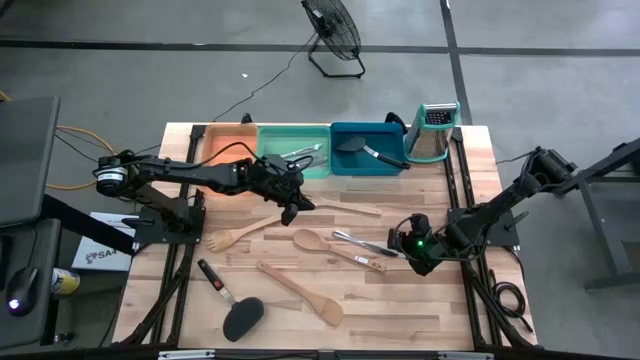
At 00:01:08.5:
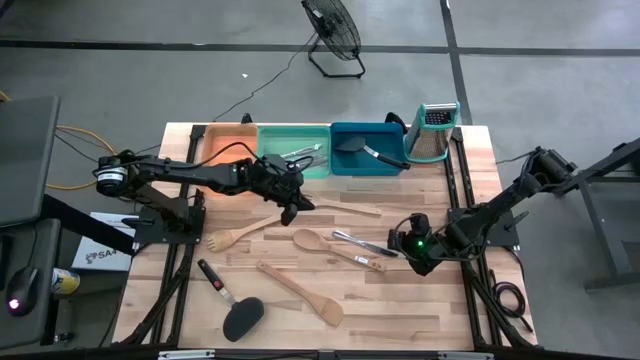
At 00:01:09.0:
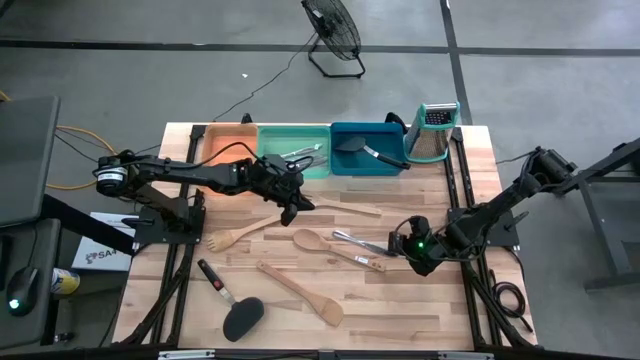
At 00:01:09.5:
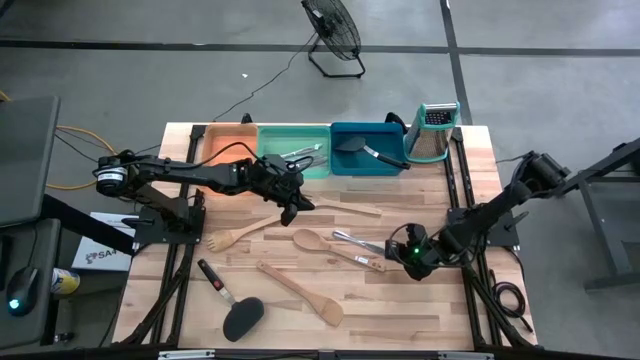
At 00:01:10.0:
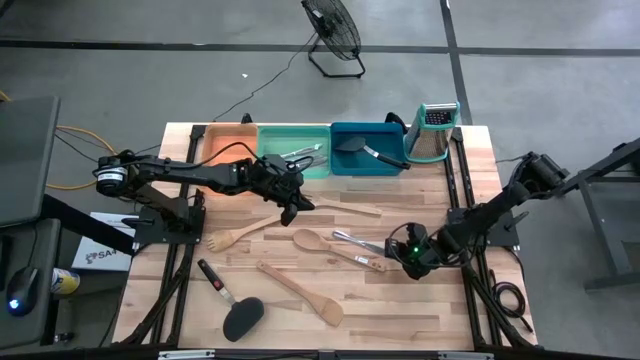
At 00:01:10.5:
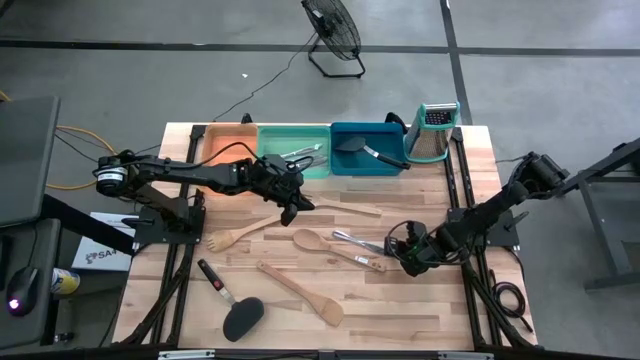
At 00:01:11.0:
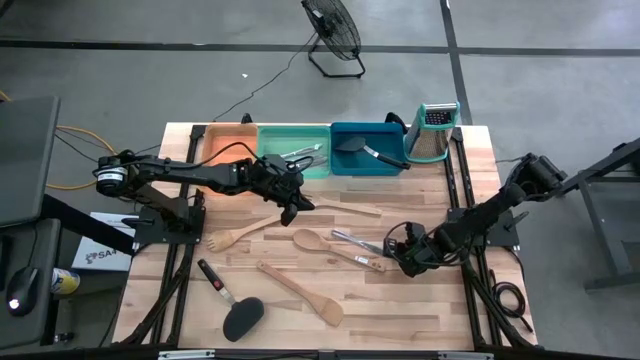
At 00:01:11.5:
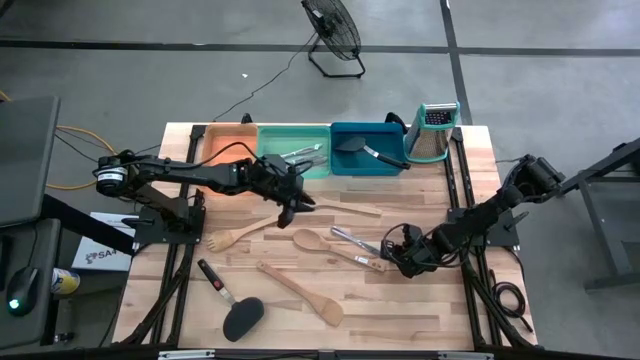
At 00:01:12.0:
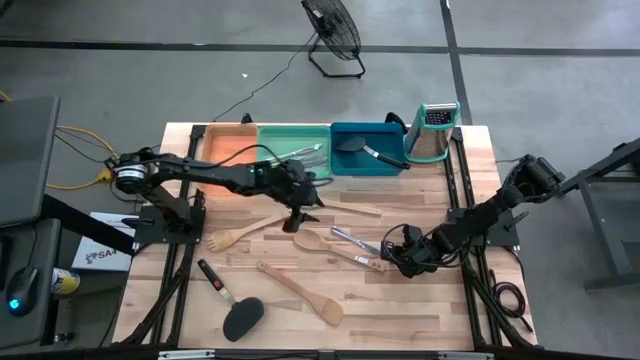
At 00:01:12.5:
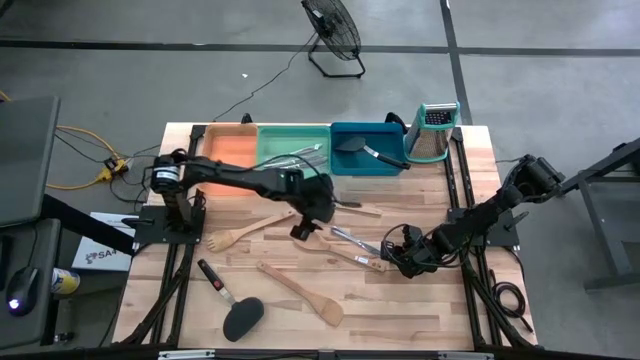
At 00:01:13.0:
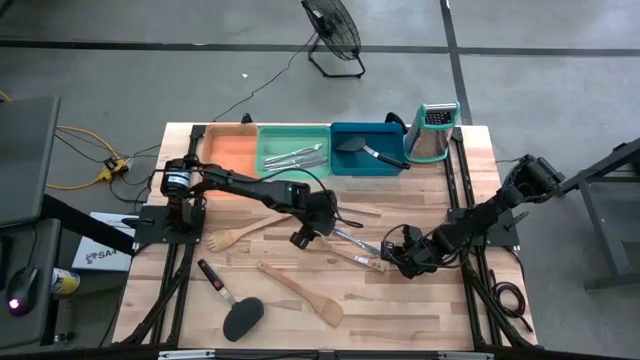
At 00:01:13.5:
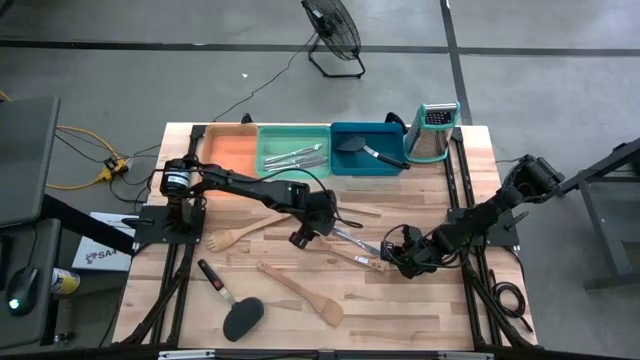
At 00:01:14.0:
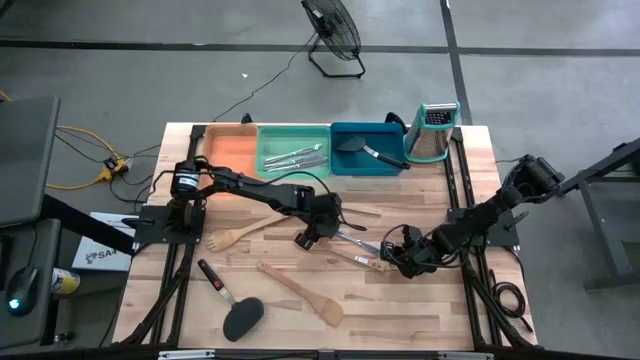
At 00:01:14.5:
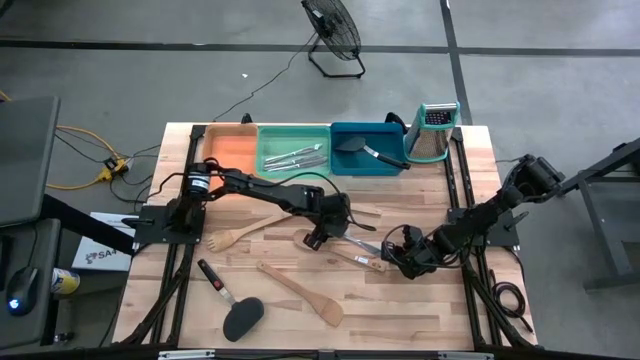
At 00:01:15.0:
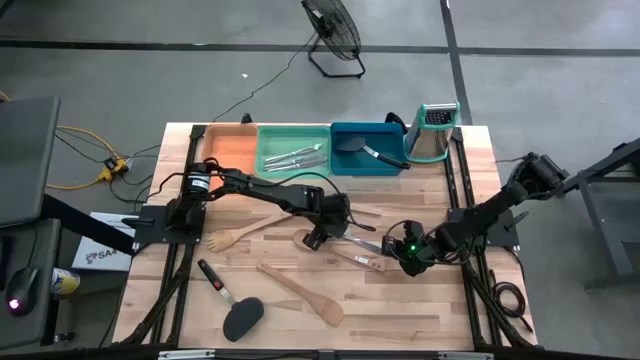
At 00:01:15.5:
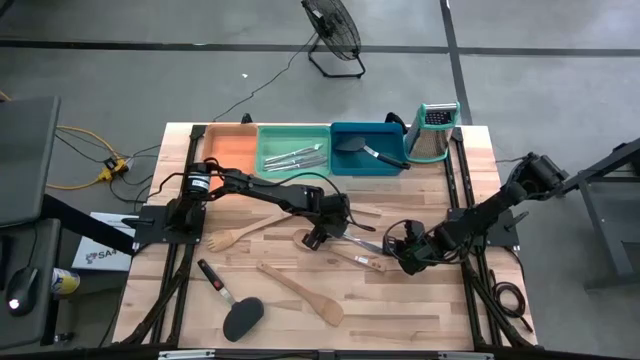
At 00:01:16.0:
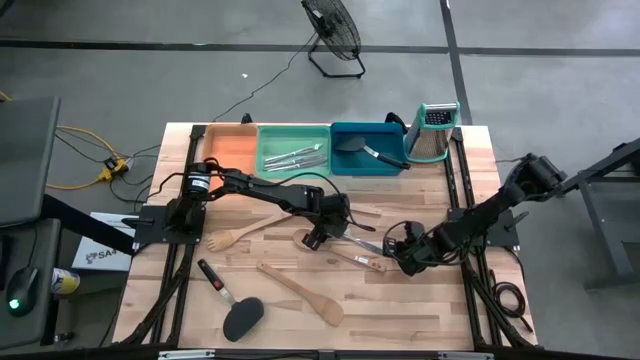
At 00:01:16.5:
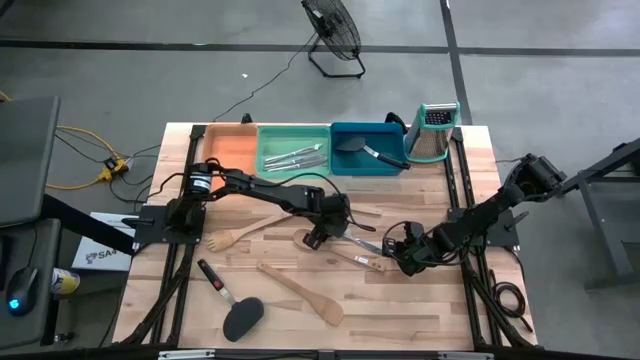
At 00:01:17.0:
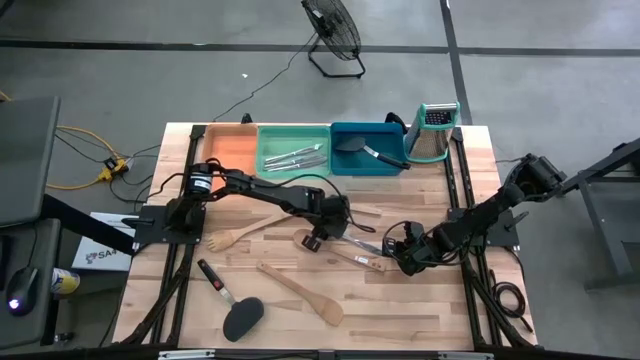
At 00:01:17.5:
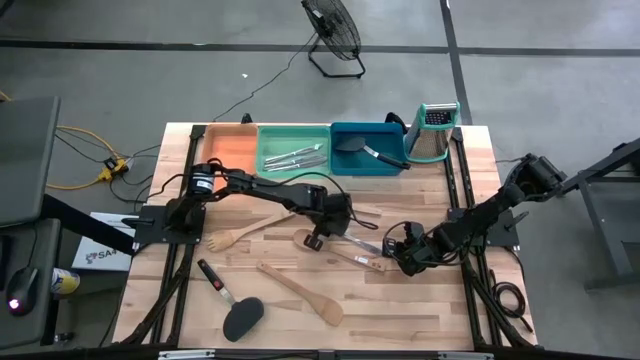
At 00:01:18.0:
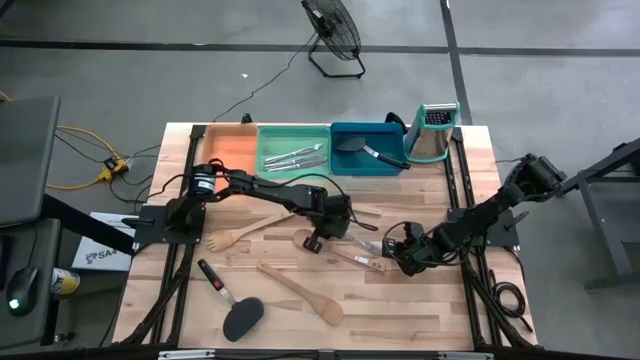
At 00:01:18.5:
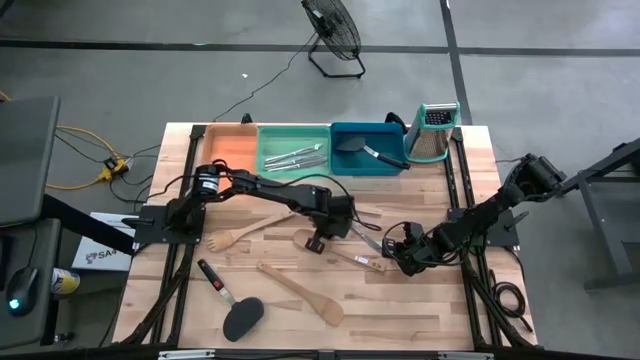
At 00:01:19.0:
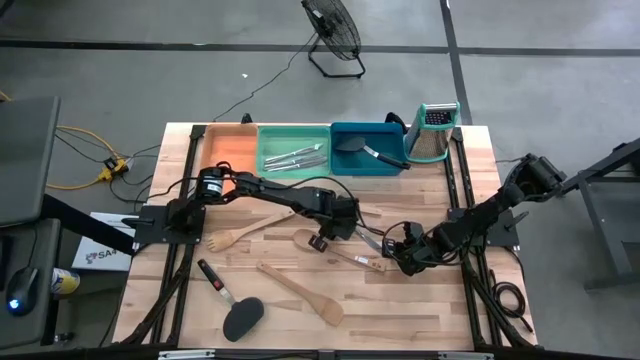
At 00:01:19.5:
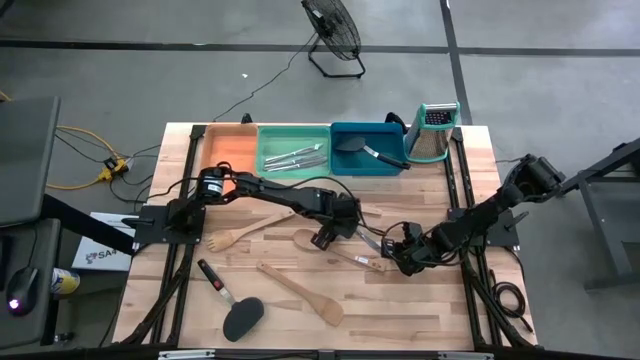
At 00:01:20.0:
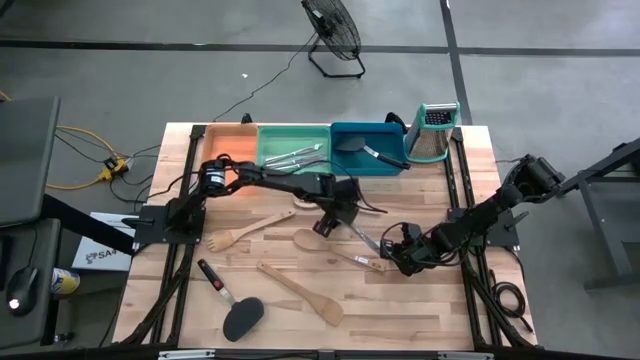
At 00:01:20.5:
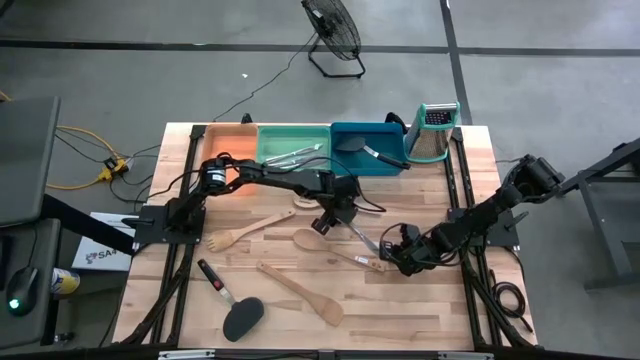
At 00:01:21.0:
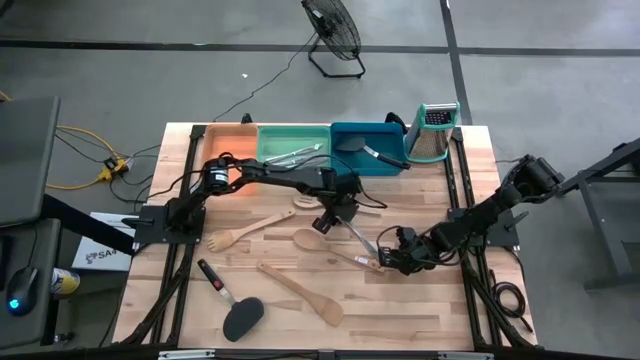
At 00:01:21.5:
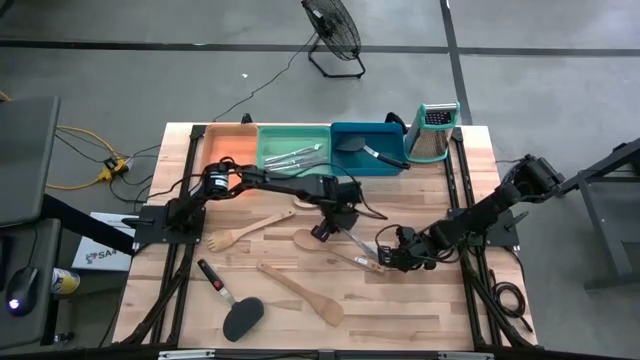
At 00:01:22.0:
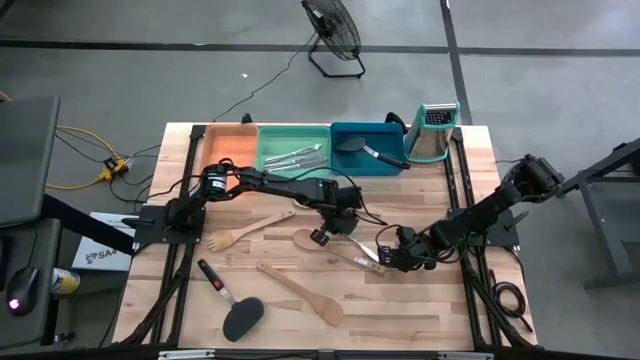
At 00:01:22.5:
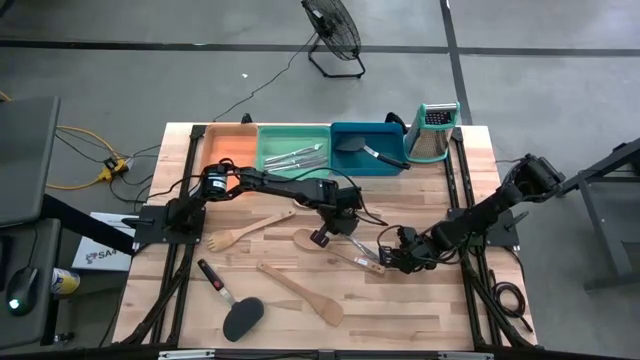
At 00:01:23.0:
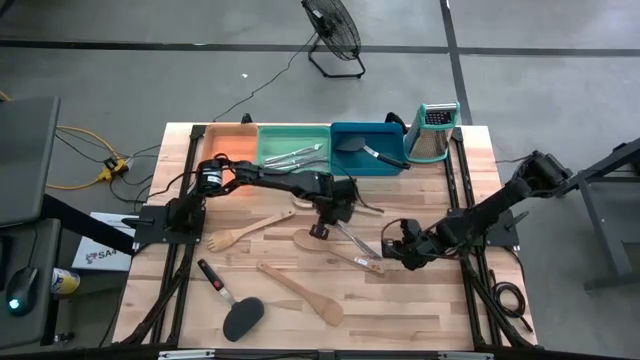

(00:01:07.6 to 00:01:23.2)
Task: Pick & Place Kitchen Items
Put the silver table knife into the green bin
